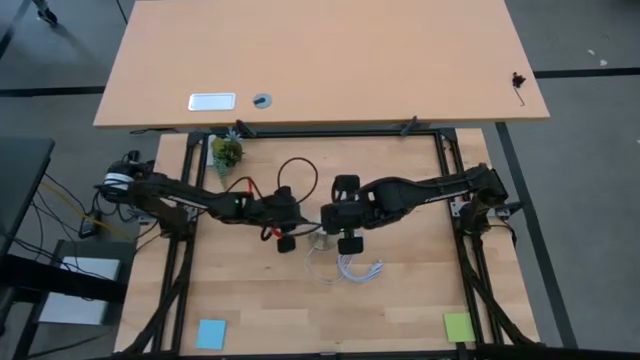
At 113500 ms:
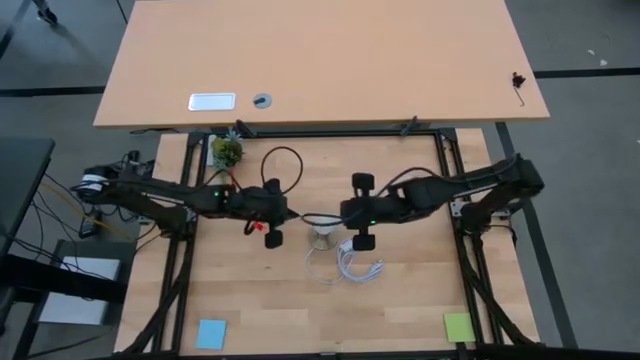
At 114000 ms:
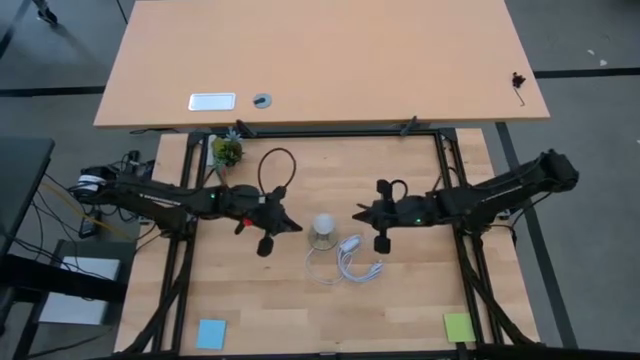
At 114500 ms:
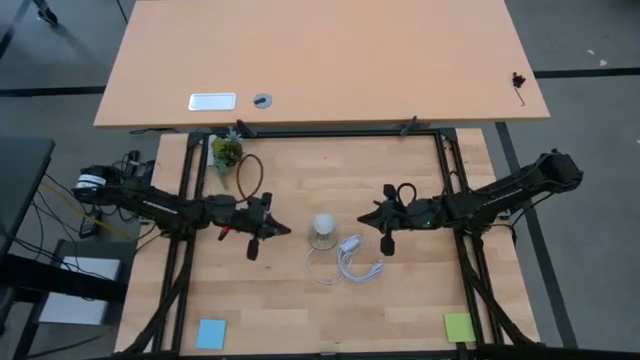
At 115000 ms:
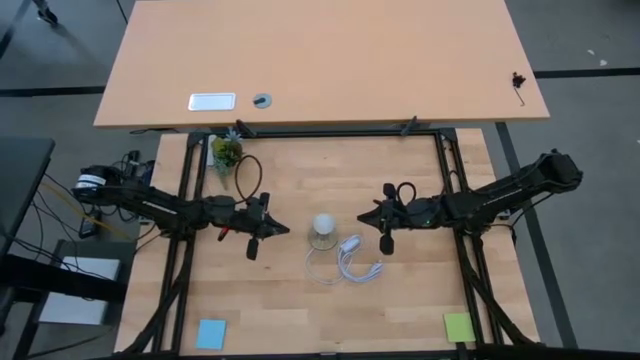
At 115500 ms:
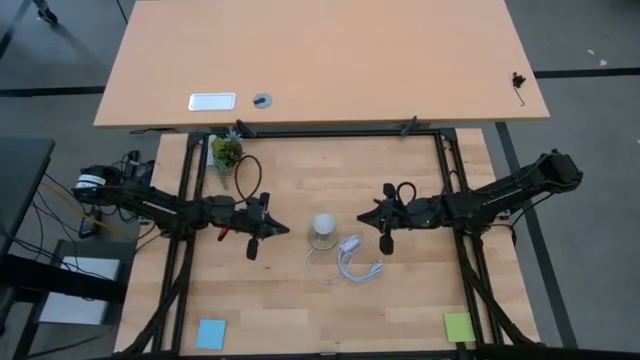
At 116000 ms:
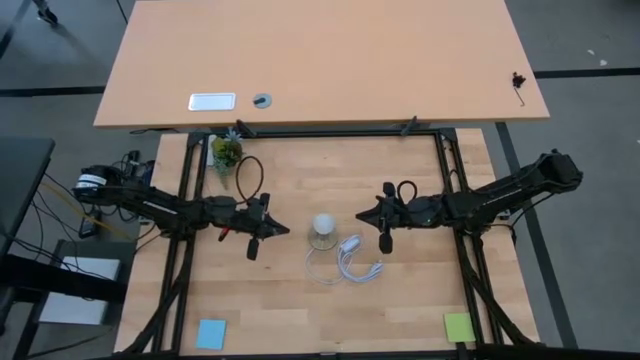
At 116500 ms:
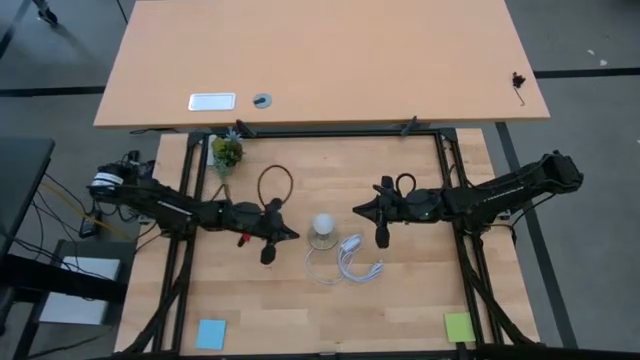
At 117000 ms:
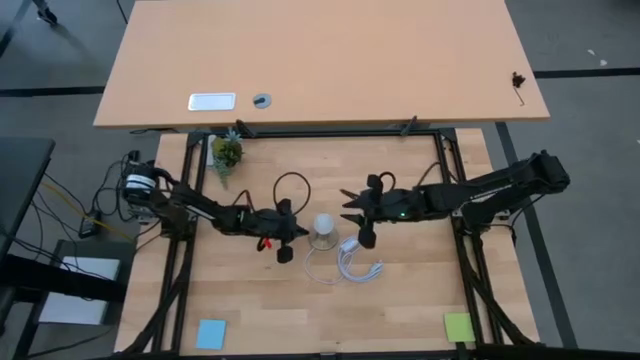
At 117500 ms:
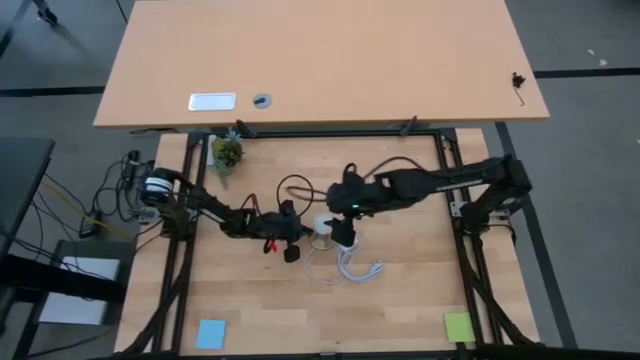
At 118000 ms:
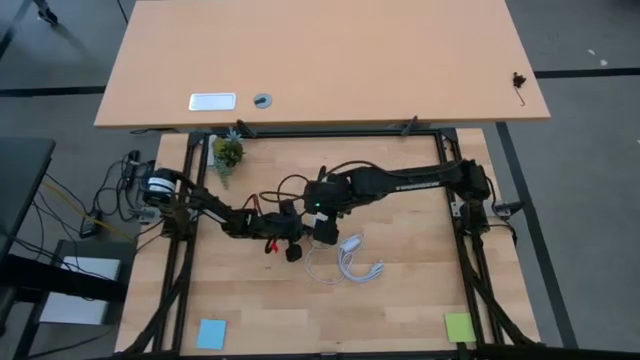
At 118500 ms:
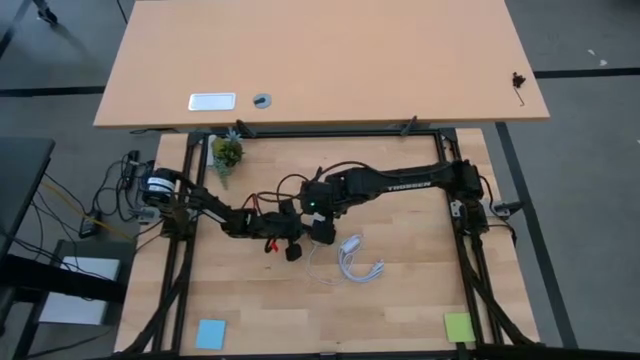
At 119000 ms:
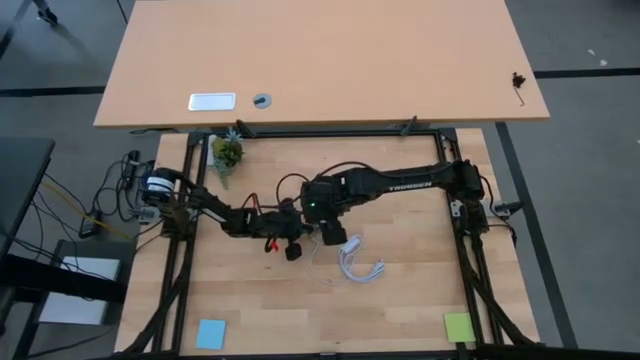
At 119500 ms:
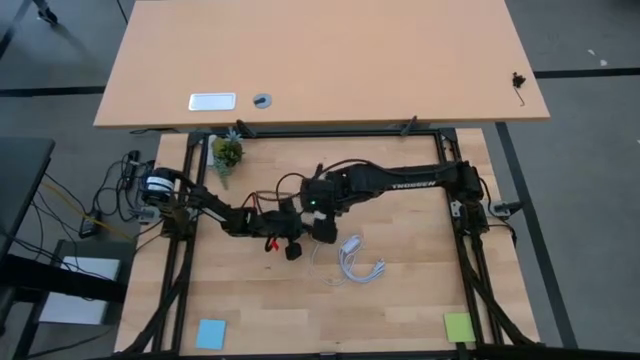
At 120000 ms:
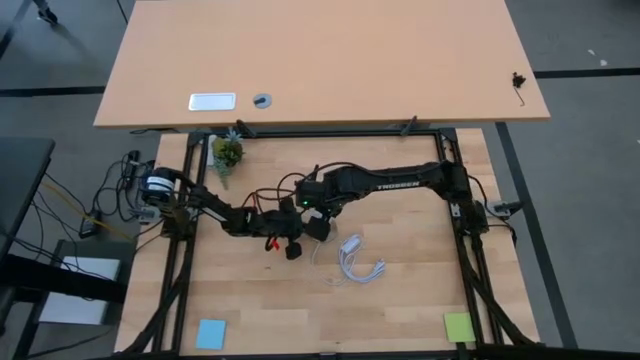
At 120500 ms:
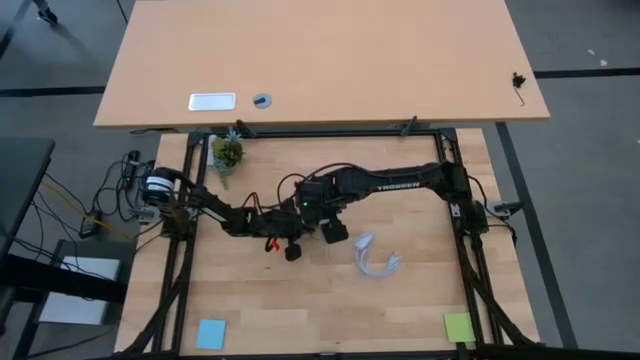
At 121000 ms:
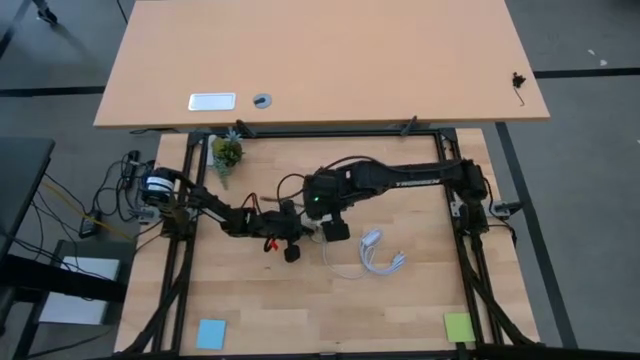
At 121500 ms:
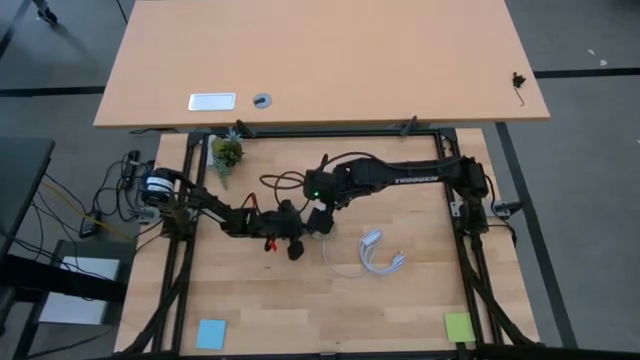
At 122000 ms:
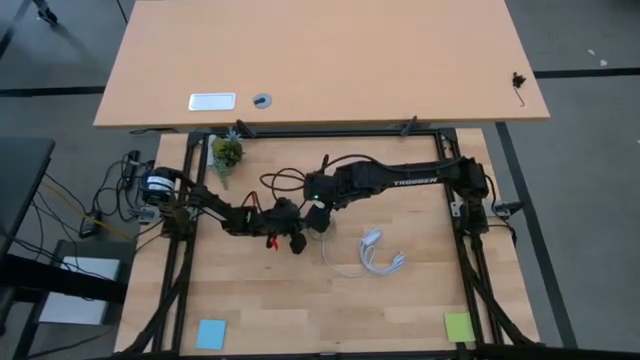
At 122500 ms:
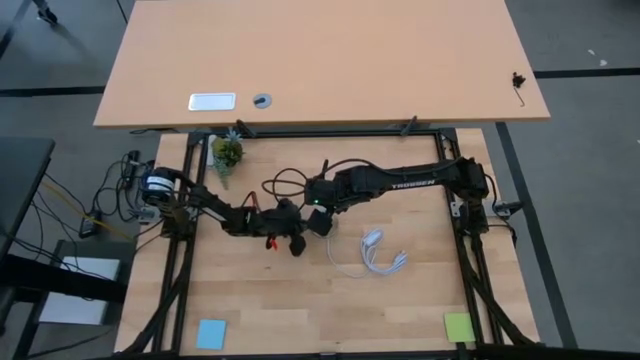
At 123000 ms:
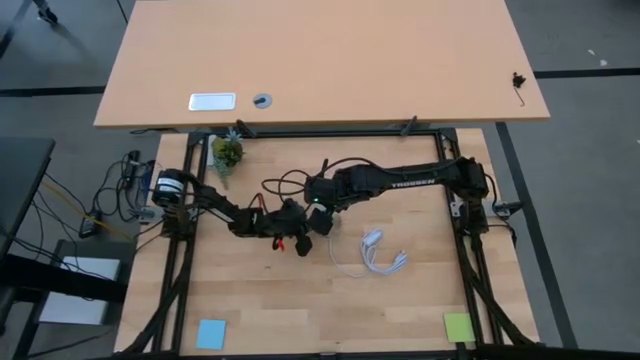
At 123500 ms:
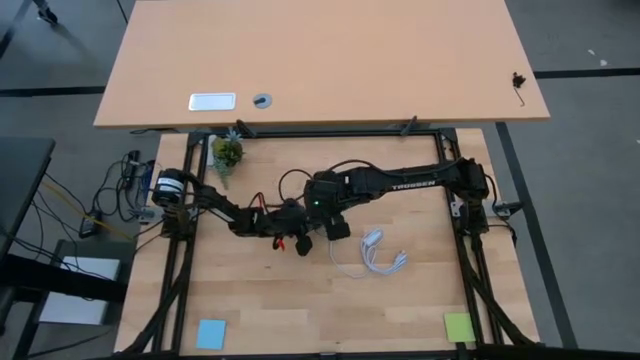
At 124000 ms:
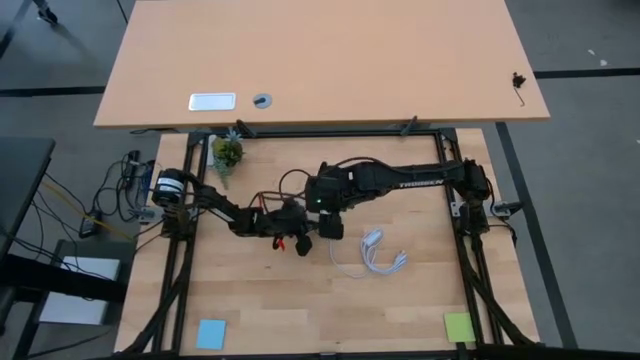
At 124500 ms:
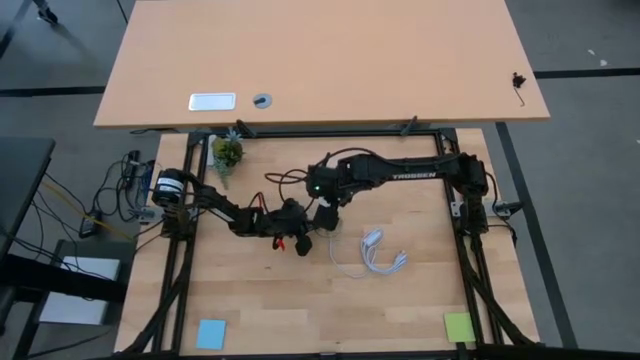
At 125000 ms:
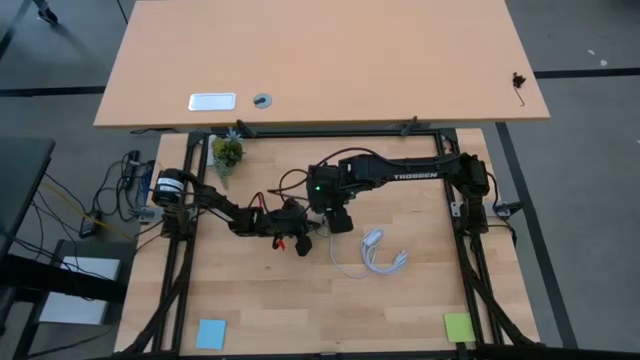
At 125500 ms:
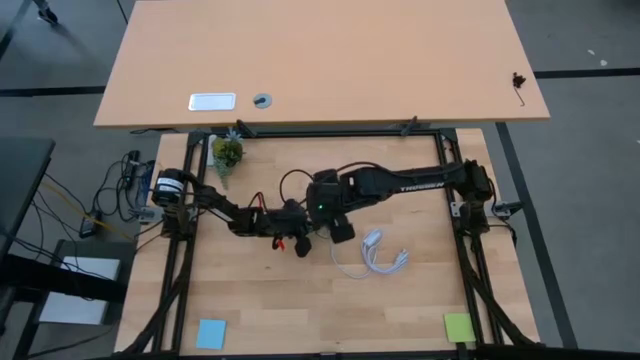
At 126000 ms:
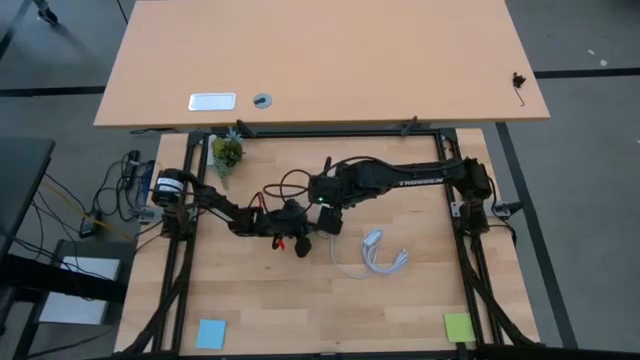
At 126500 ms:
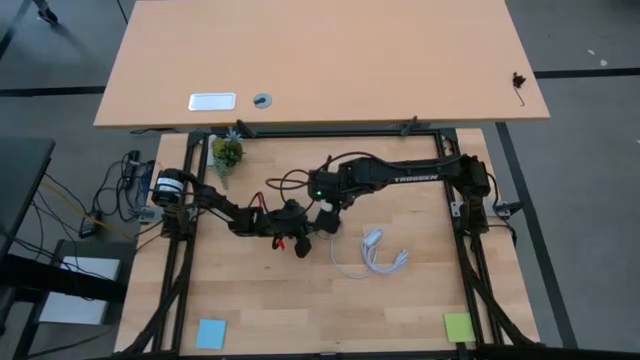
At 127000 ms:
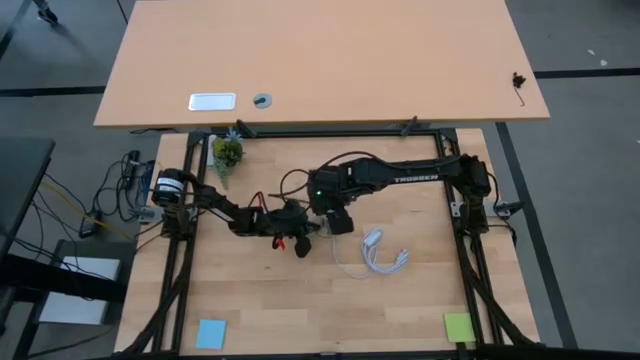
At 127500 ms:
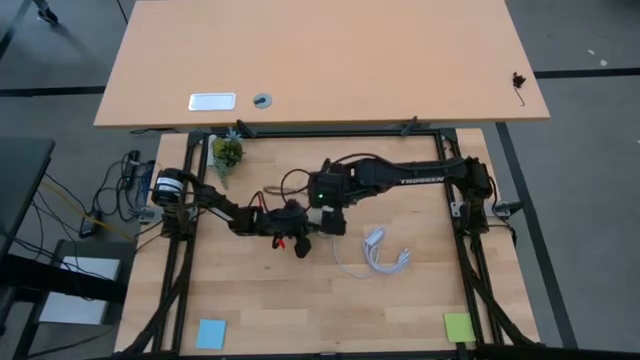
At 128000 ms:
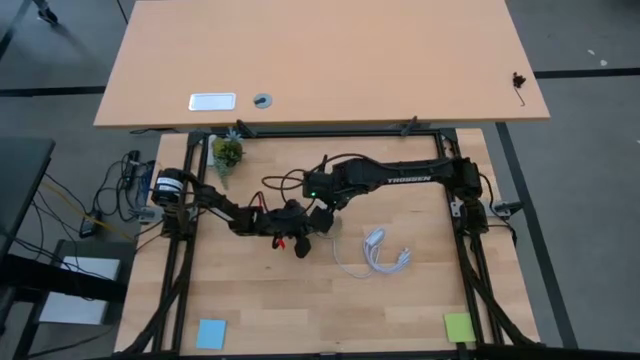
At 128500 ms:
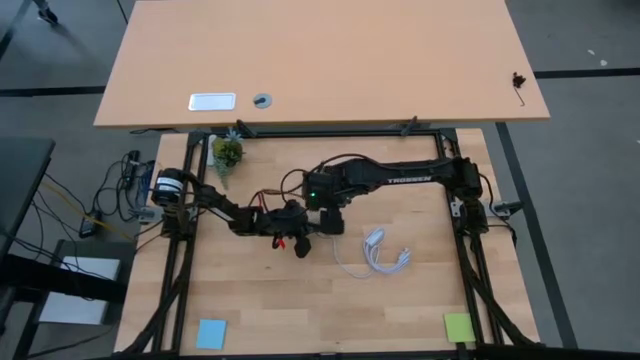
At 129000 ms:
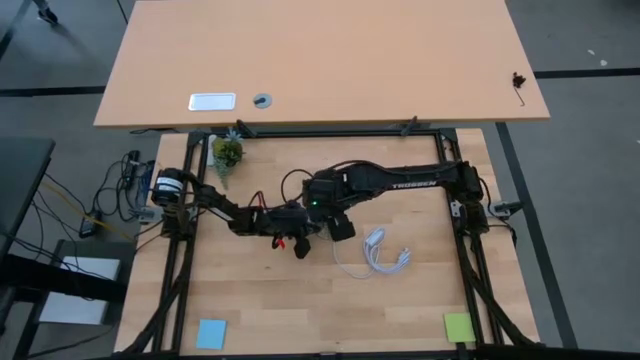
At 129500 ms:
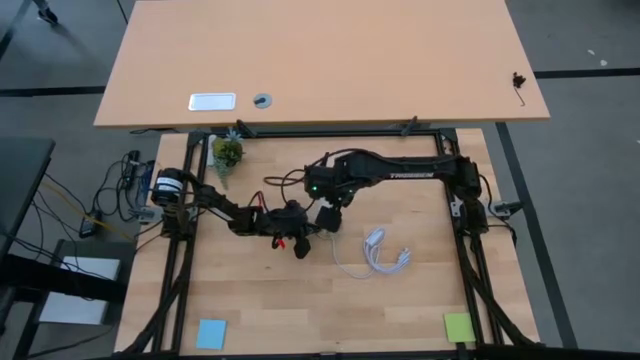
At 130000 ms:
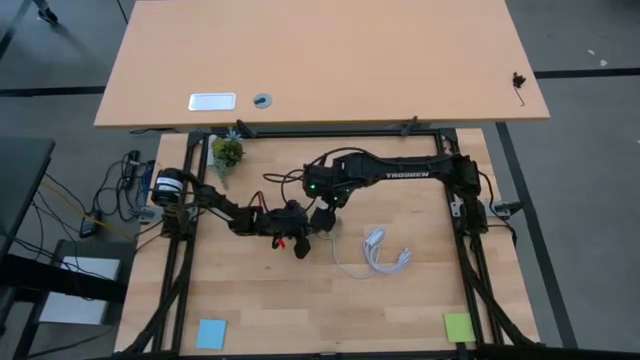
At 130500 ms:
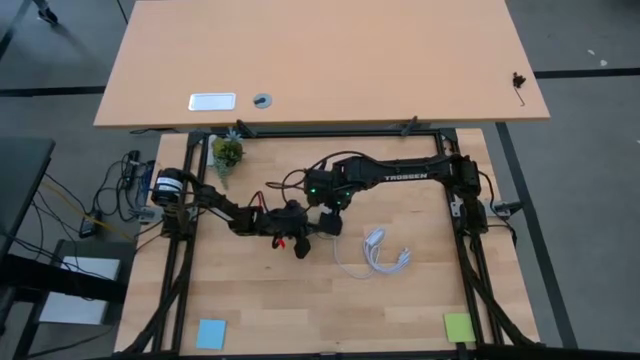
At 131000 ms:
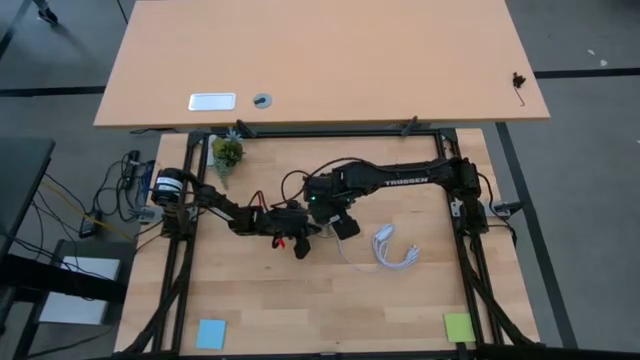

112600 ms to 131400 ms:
Task: Screw lightbulb
Remove the lightbulb from the lamp socket

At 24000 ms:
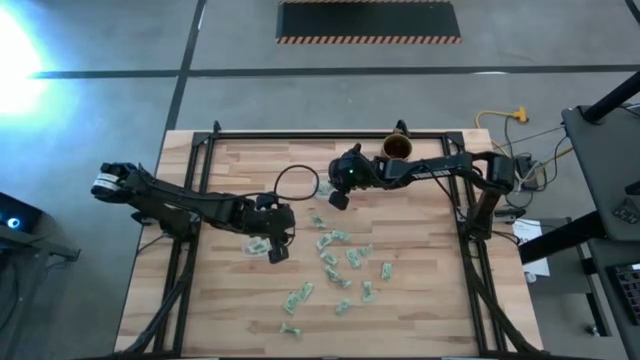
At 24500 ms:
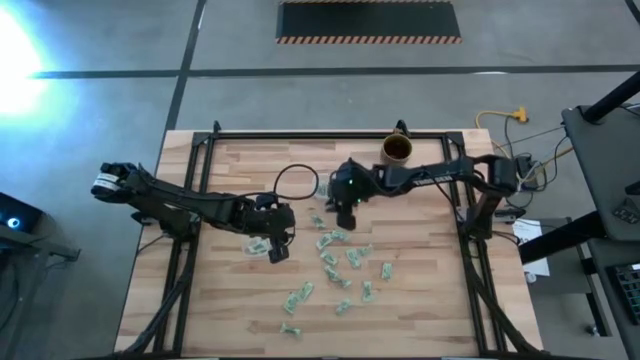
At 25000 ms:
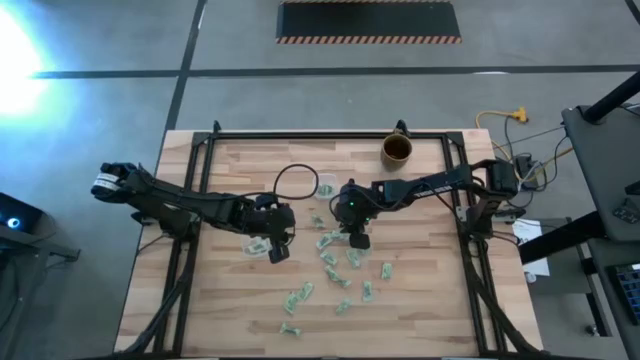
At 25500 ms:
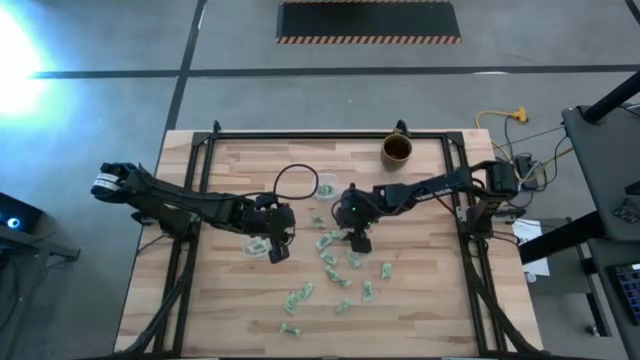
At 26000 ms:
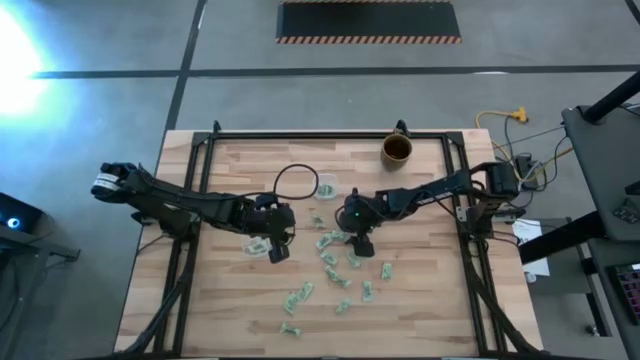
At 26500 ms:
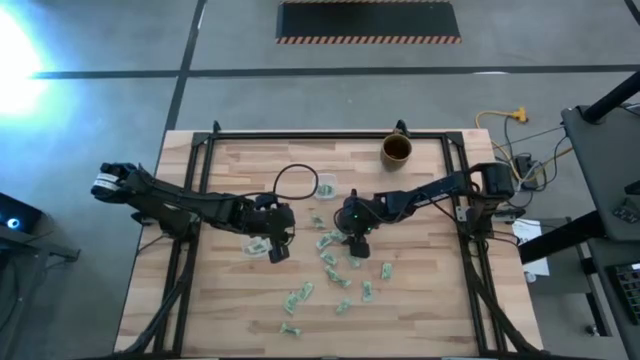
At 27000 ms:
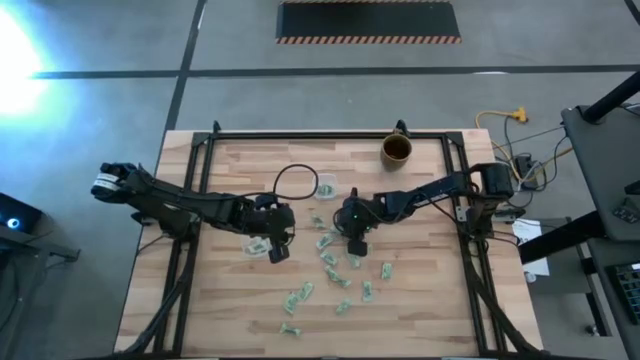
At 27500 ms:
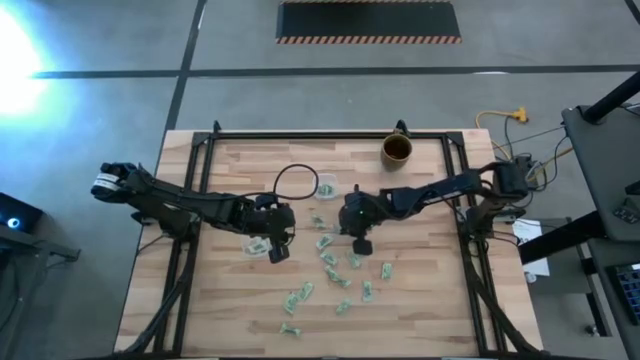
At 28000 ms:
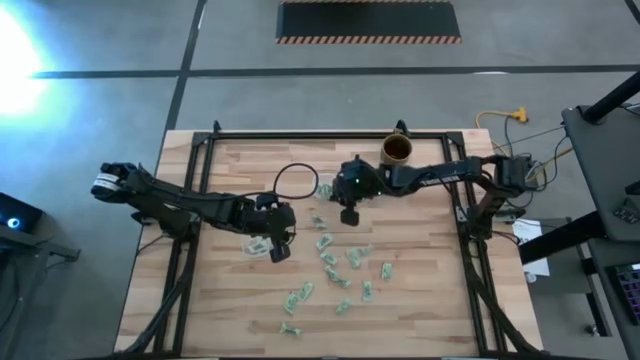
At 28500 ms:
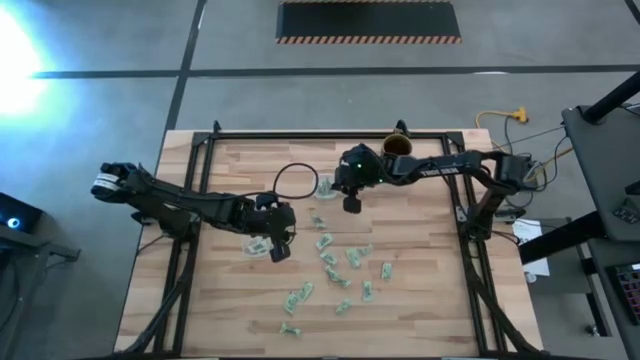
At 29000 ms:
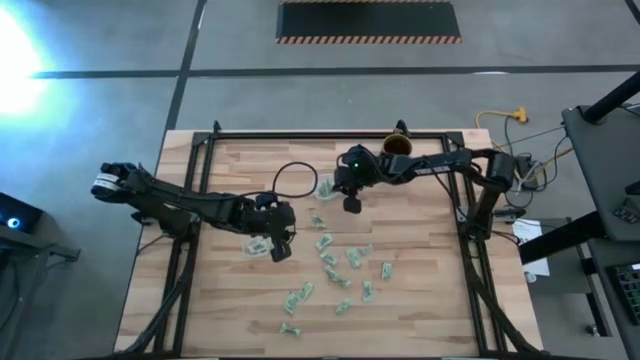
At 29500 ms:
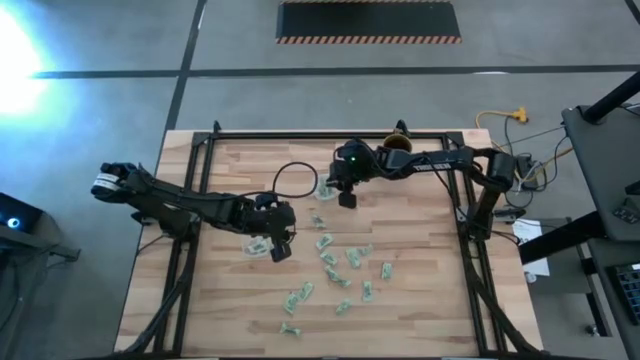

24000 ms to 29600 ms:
Task: Pick and place Stevia / Truvia into bins
Put the stevia packet into the top transparent container
